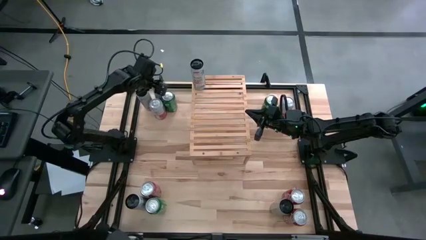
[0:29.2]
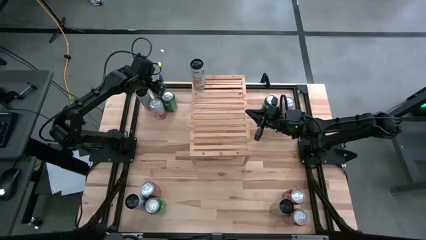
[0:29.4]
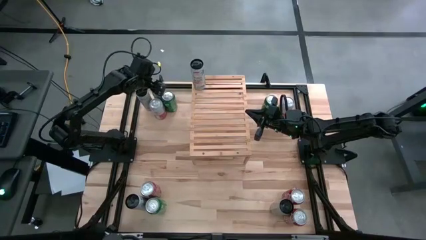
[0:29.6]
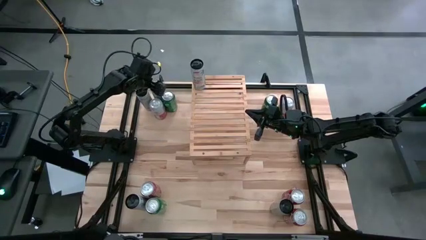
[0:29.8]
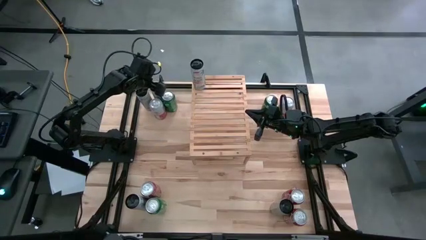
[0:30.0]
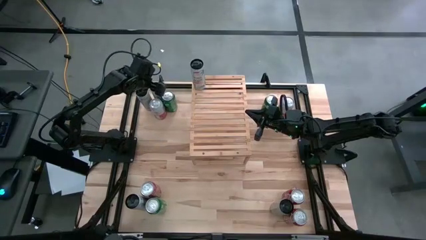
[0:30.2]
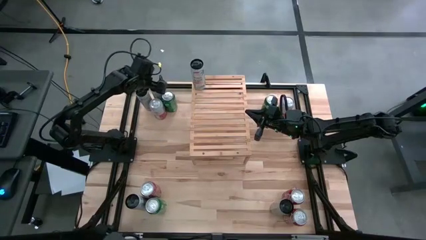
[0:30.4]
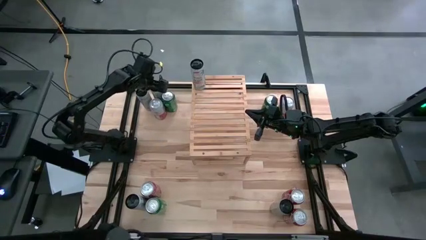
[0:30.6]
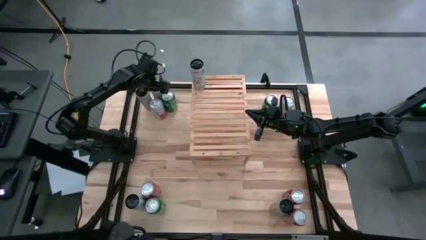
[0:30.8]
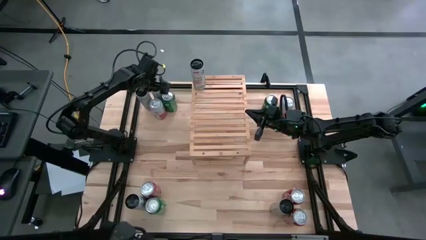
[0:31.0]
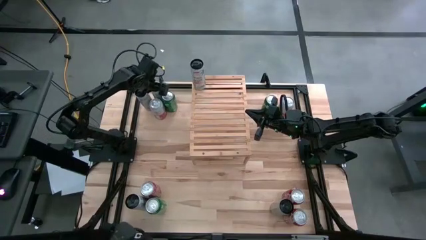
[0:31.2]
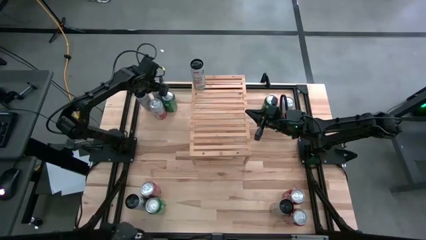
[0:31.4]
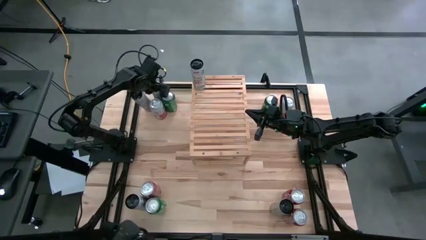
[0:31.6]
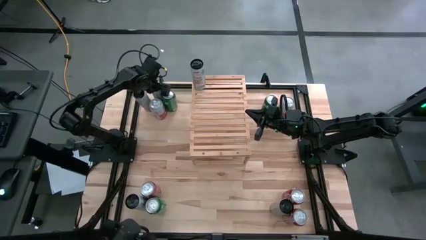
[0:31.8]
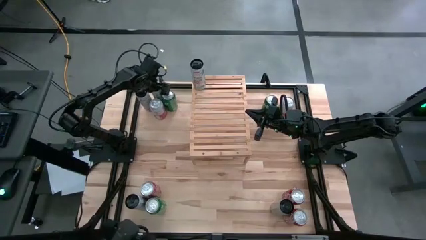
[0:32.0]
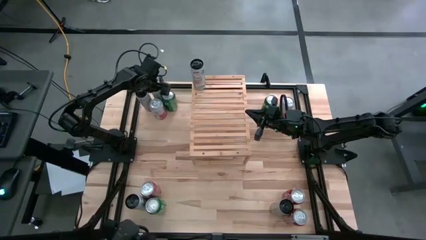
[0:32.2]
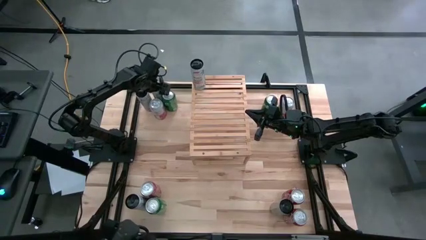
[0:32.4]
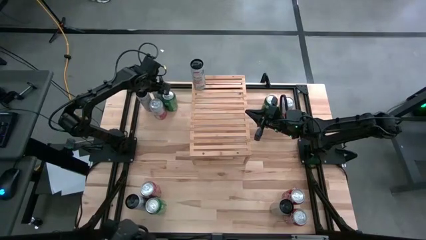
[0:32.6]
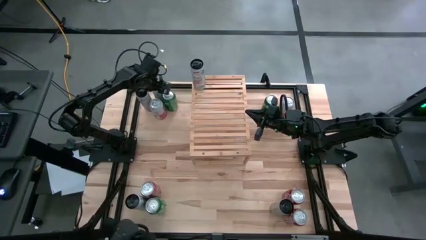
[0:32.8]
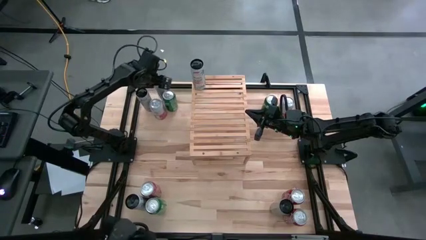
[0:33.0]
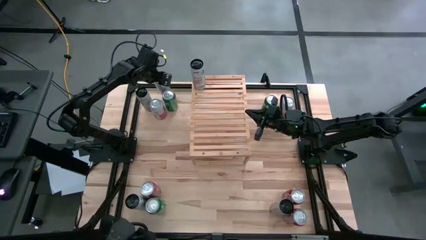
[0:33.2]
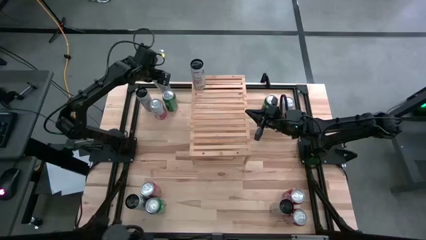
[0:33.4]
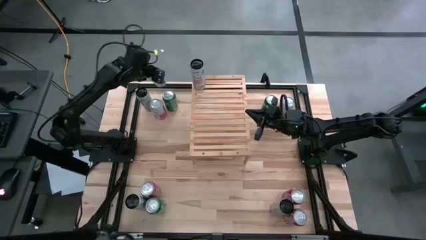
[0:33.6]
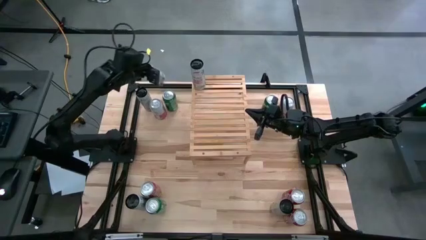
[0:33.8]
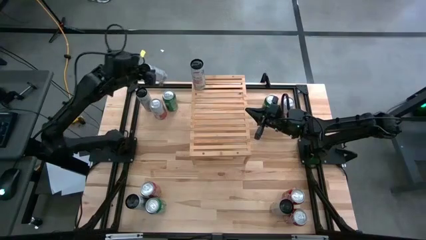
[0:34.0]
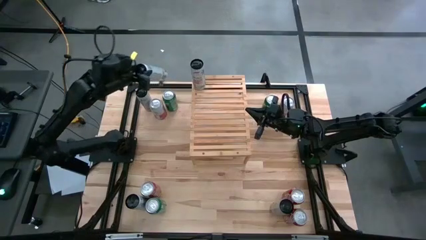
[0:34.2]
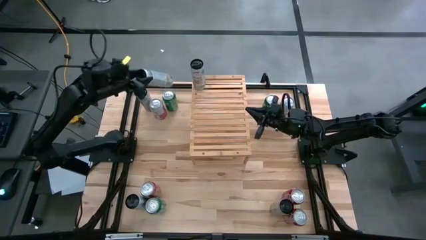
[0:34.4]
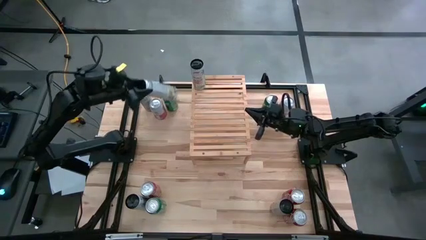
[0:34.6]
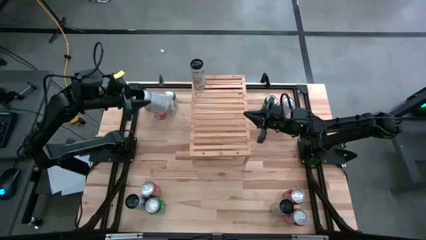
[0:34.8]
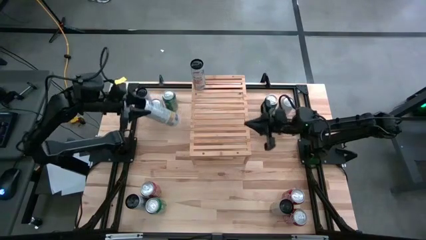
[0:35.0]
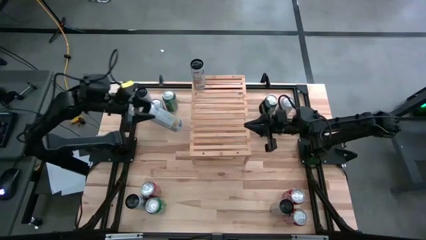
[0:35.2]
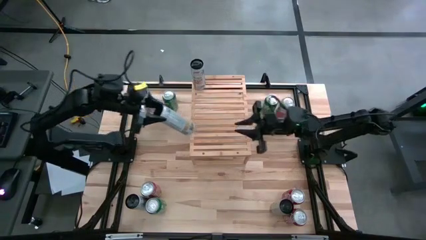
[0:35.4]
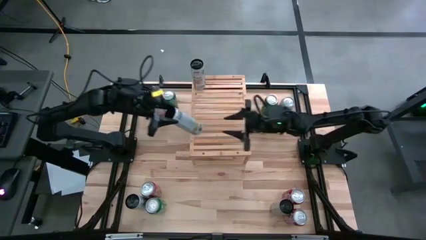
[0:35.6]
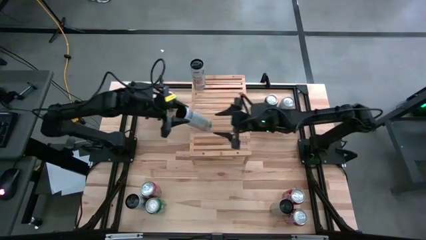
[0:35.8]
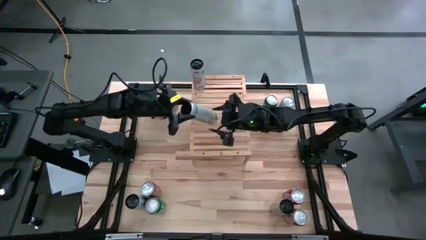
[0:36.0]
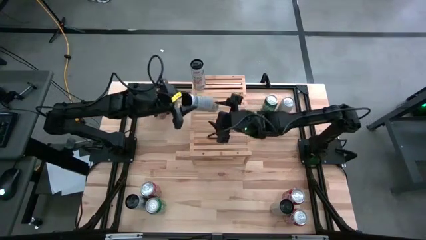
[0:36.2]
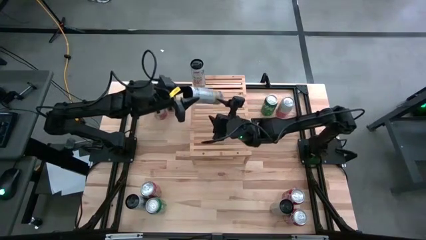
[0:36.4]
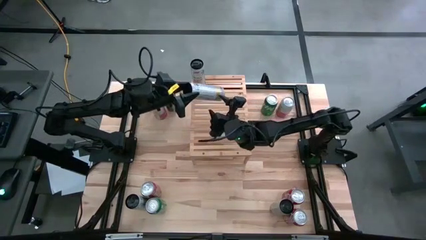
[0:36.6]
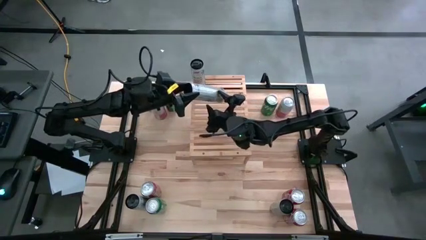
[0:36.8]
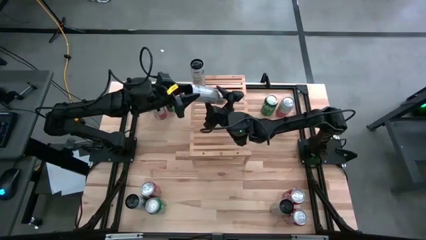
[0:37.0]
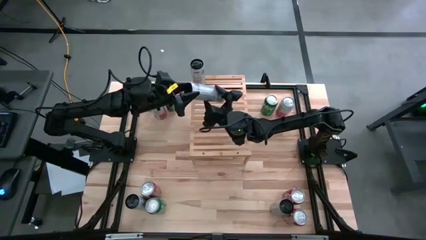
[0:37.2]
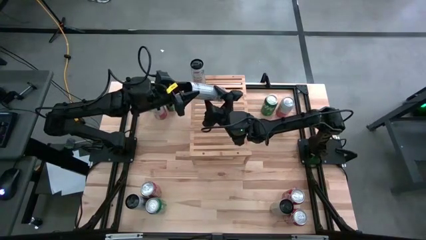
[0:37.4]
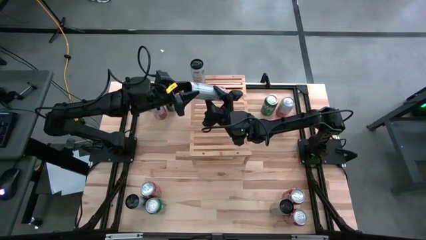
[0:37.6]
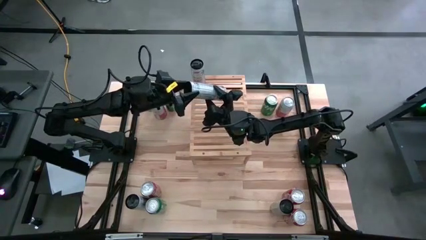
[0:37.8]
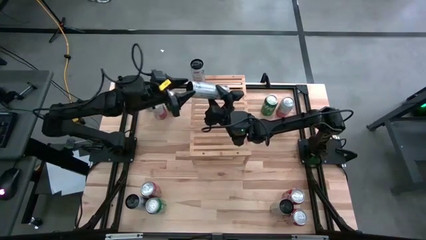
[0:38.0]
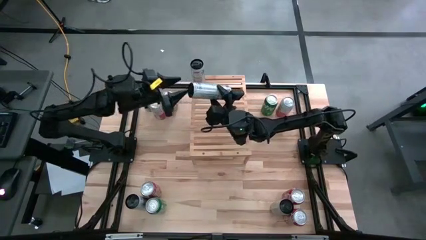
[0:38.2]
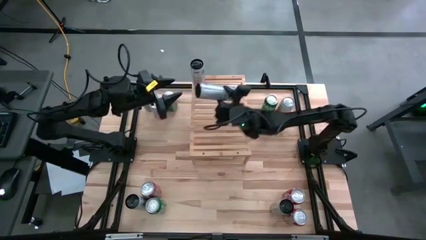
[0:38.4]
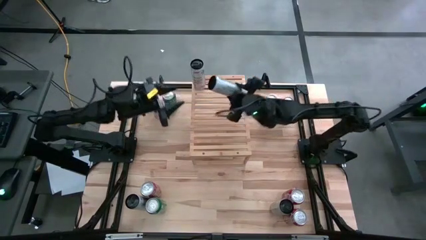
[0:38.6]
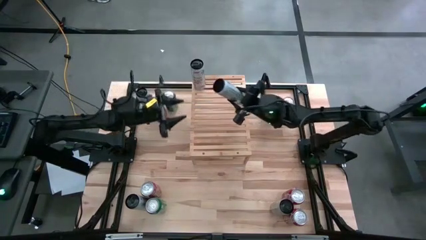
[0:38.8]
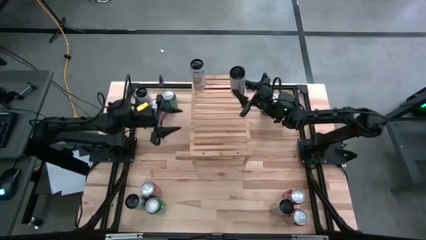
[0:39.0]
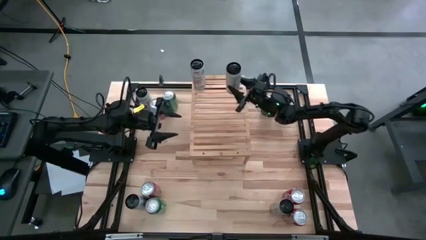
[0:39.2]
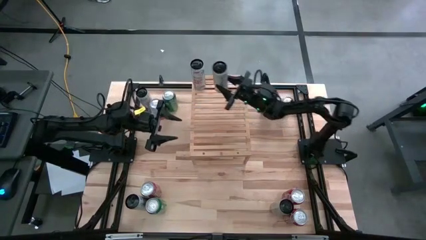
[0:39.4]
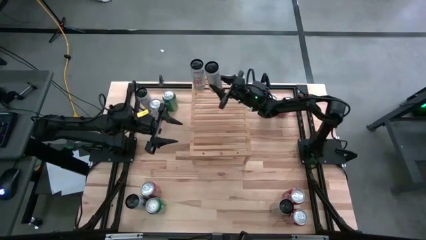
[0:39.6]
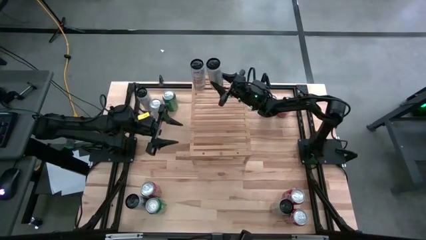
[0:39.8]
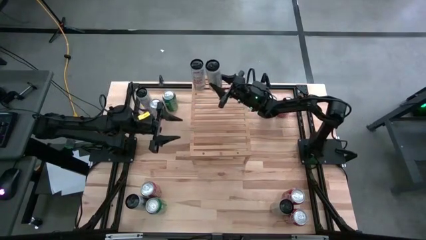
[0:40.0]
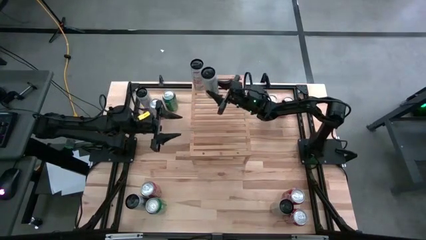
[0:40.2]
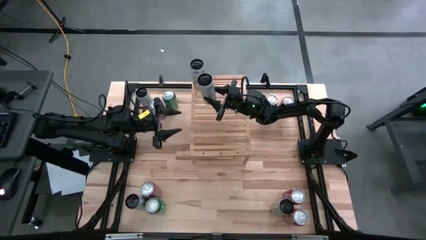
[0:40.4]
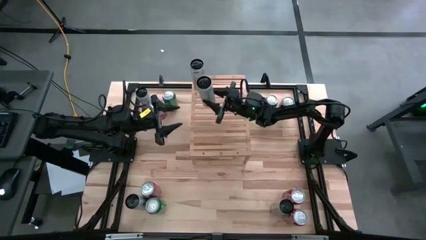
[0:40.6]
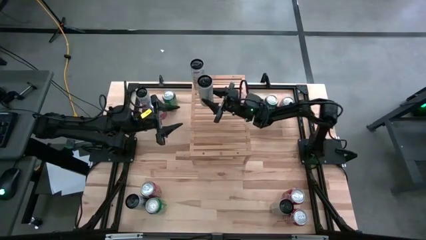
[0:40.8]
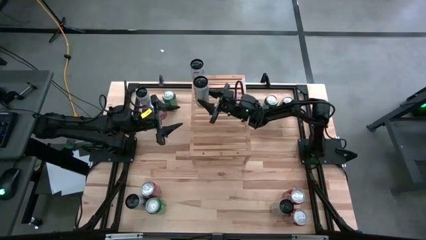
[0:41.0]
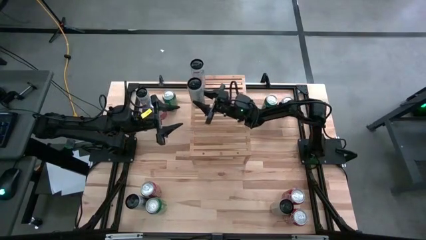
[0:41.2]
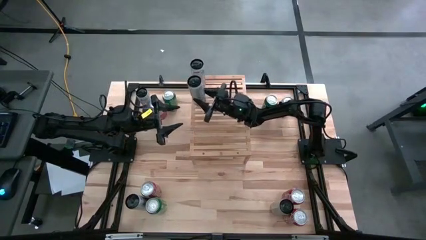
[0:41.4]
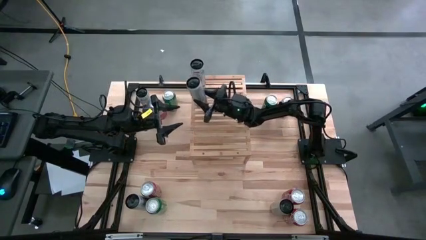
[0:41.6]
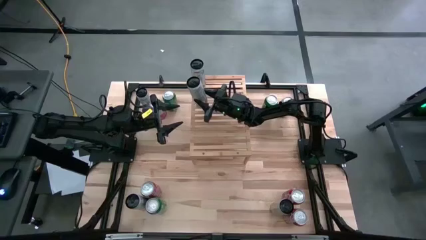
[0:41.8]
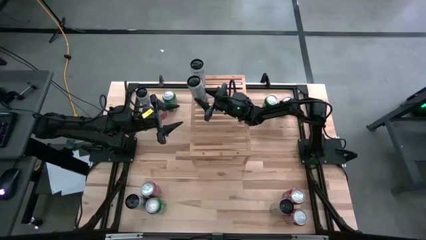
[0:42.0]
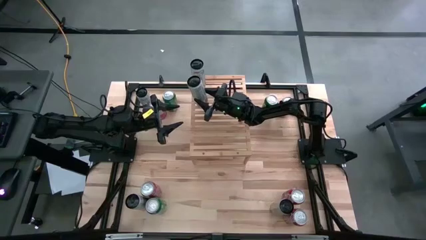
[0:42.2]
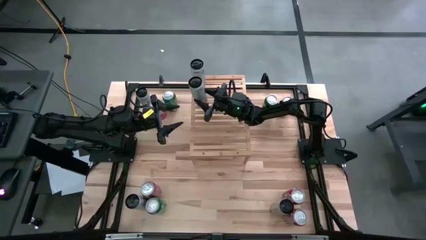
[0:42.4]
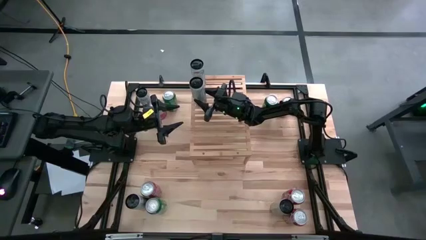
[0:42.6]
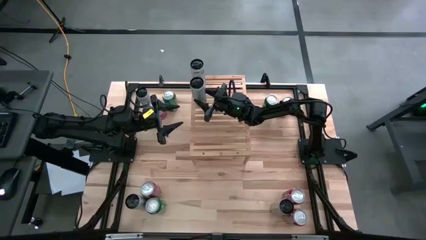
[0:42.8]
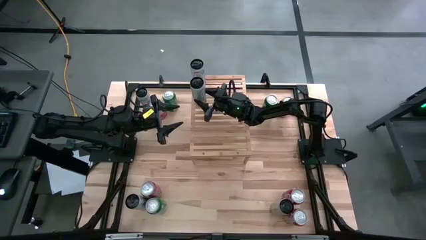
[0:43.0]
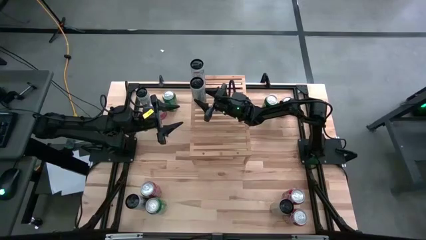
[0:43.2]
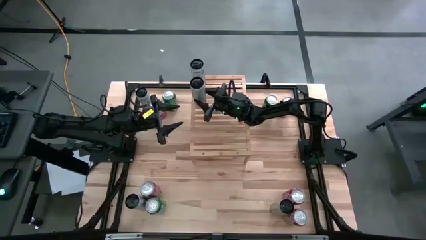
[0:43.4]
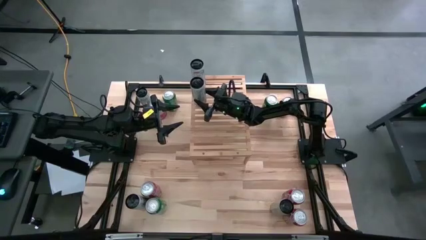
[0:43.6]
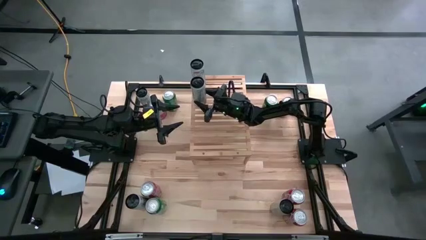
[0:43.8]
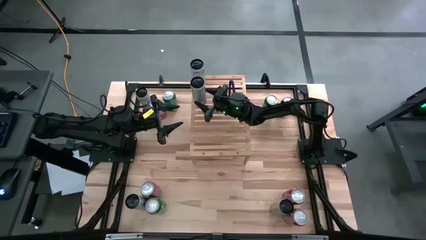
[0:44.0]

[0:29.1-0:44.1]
Task: Place canned beverage on shelf
Put the top white yellow soda can on the shelf

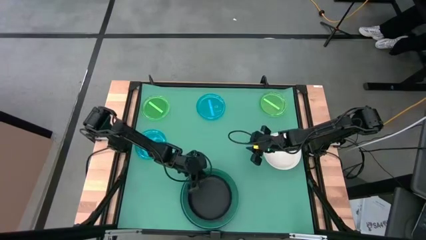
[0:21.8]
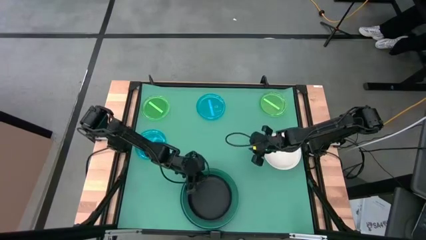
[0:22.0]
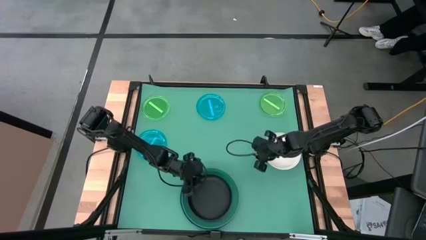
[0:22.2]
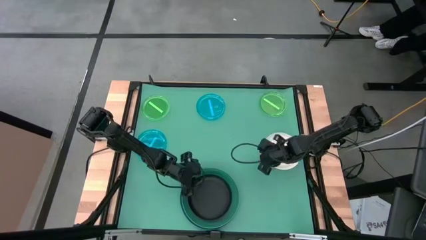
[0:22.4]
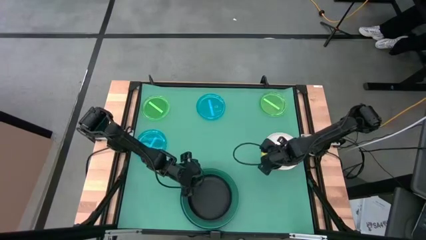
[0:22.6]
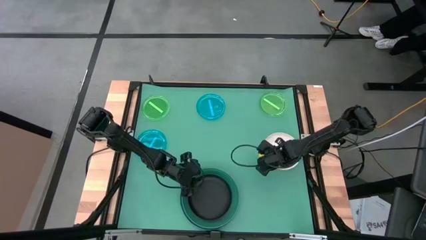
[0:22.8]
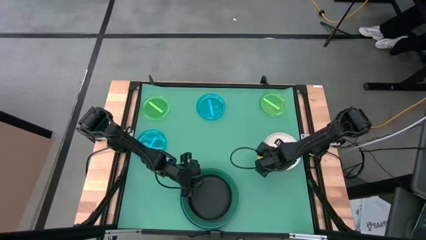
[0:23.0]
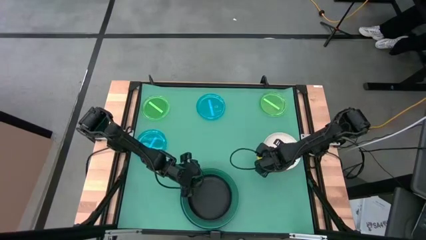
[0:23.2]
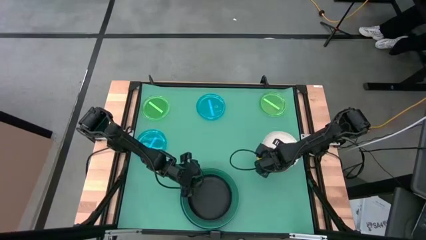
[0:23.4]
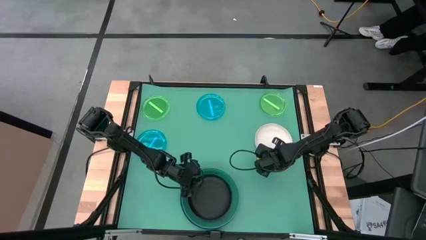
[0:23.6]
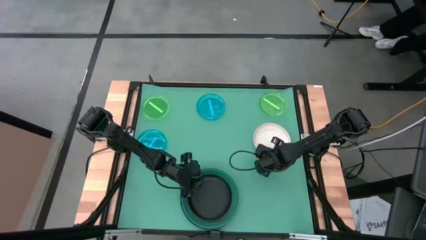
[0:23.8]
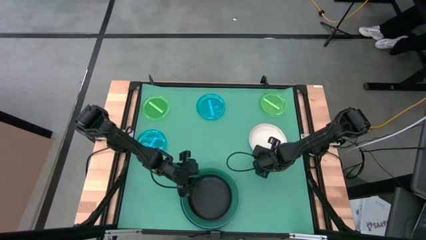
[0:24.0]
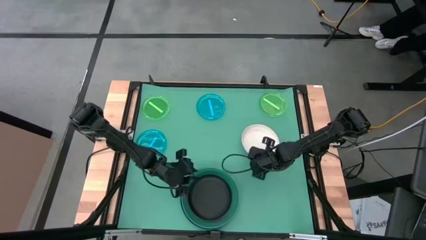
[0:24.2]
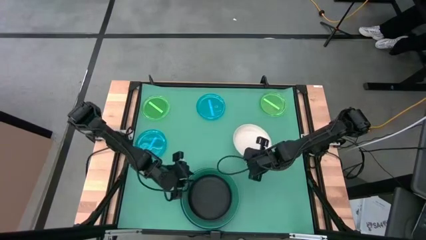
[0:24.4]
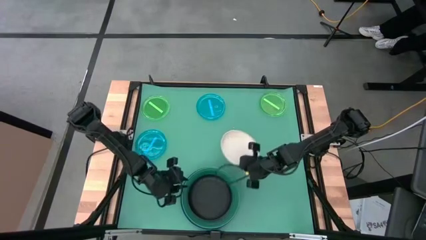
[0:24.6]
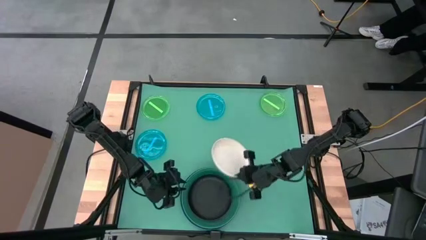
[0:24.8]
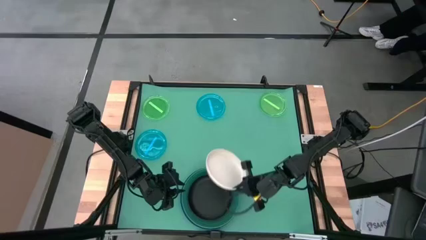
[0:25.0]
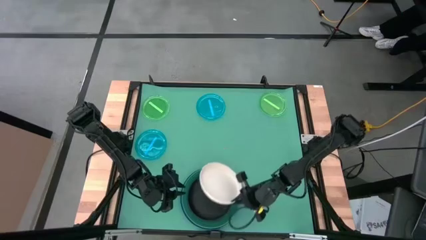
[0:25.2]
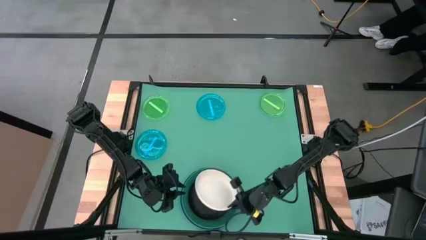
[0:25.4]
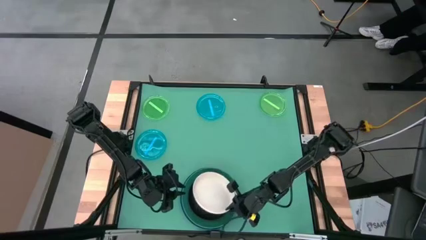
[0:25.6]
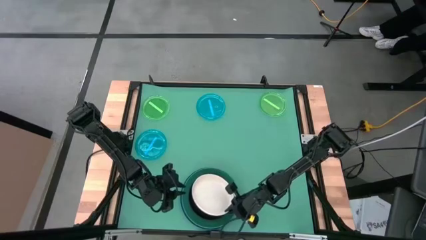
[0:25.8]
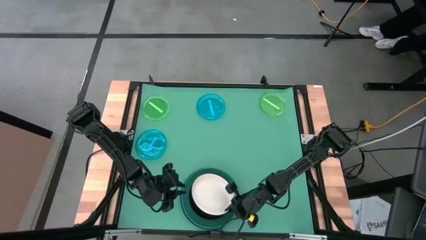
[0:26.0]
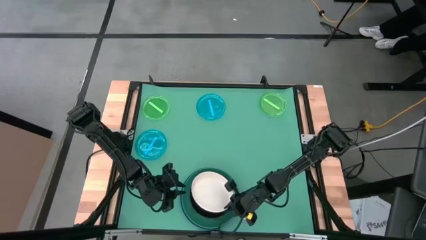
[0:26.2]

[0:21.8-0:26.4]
Task: Stack plastic plates
Stack the white plate on top of the black plate
